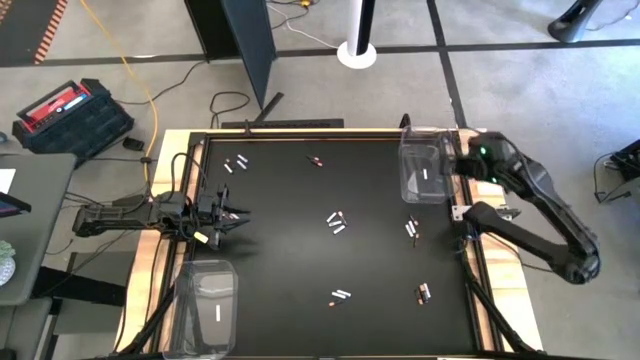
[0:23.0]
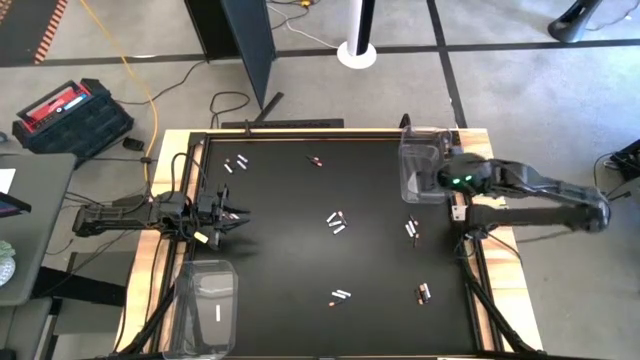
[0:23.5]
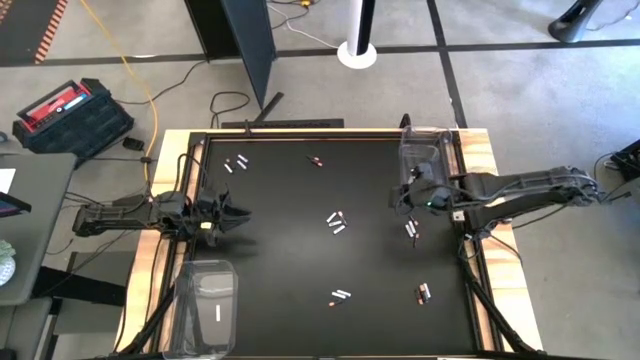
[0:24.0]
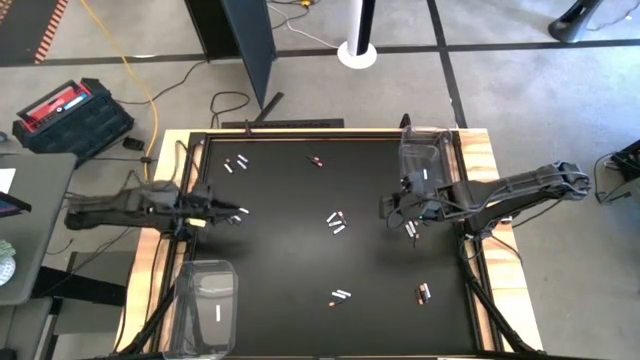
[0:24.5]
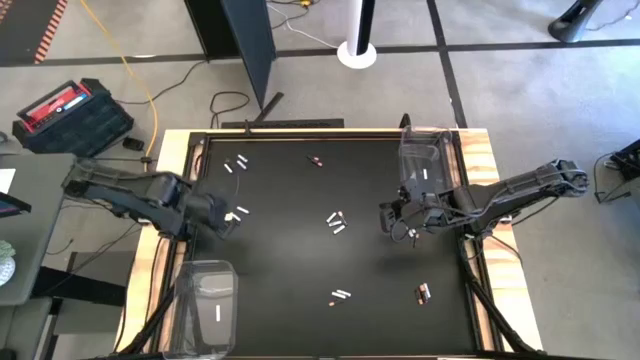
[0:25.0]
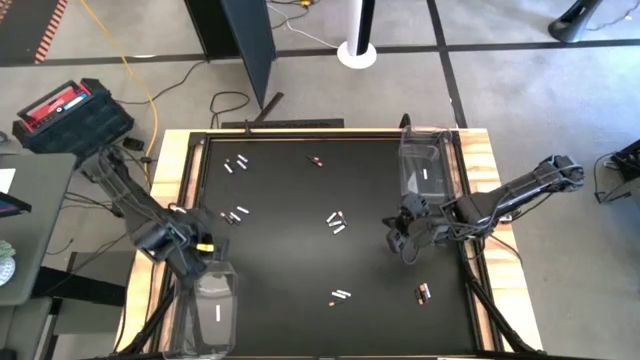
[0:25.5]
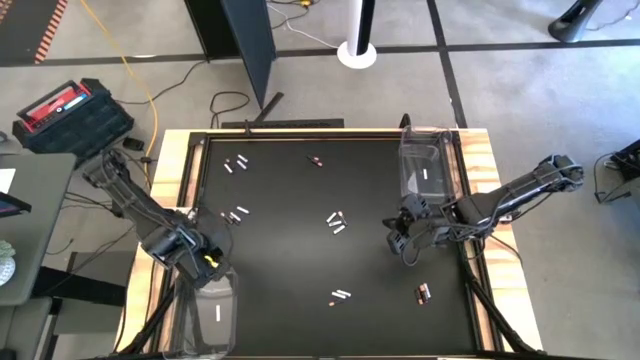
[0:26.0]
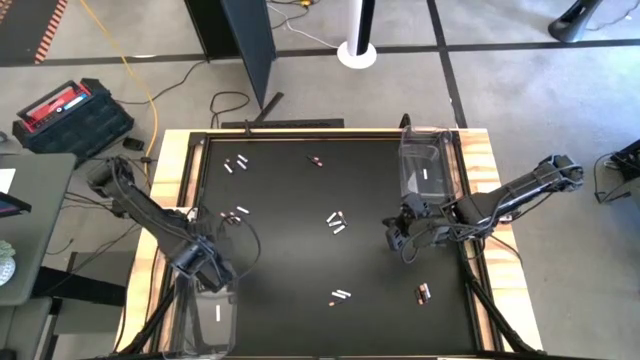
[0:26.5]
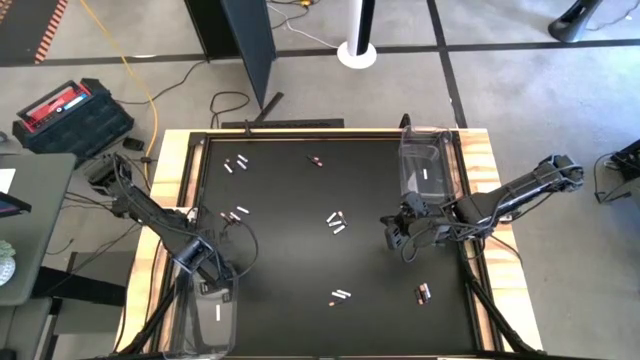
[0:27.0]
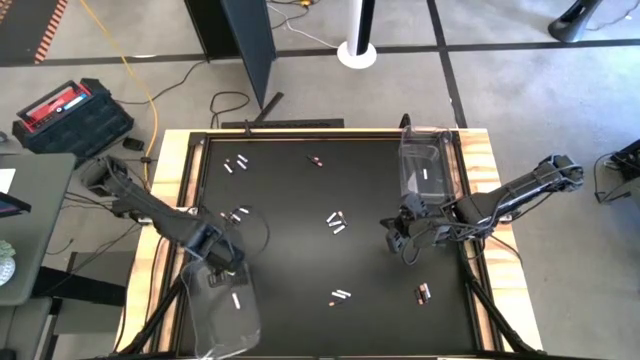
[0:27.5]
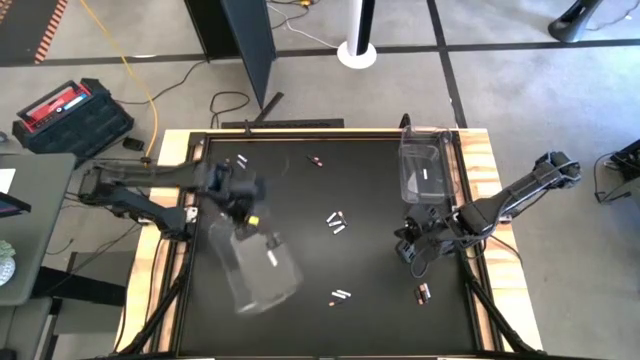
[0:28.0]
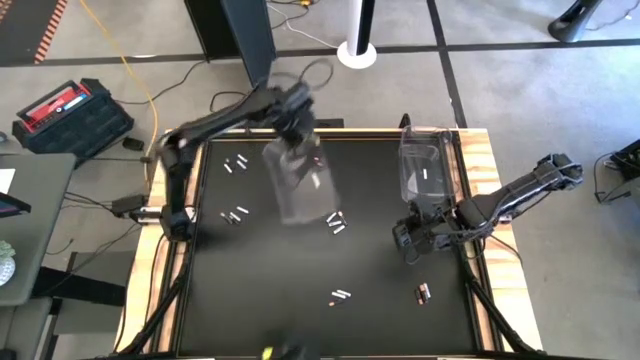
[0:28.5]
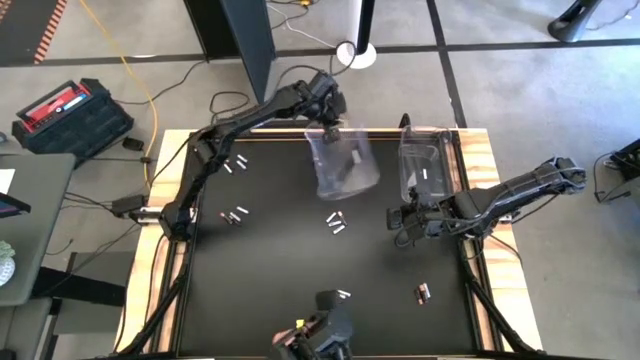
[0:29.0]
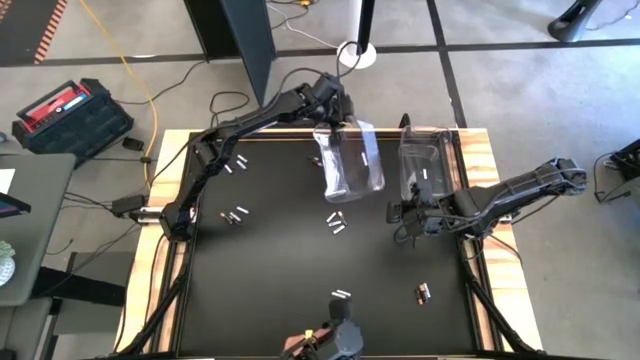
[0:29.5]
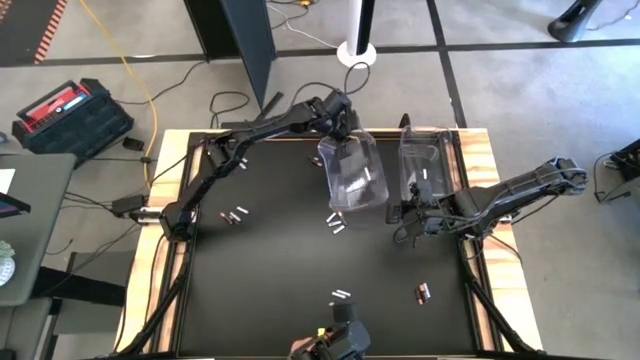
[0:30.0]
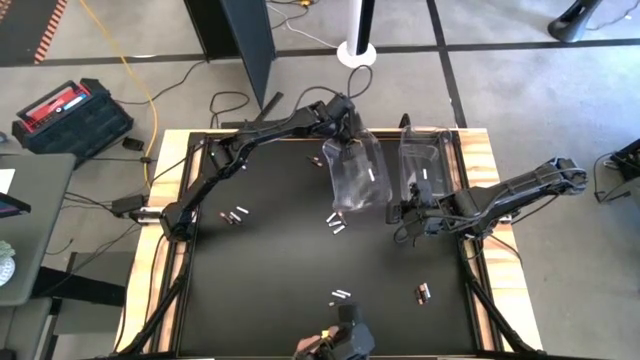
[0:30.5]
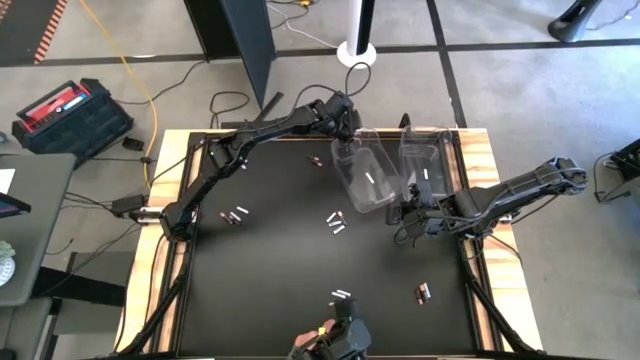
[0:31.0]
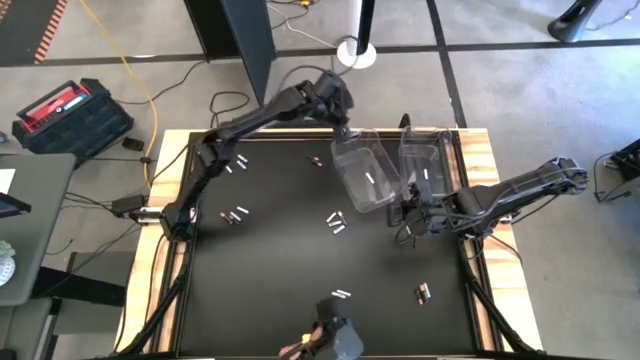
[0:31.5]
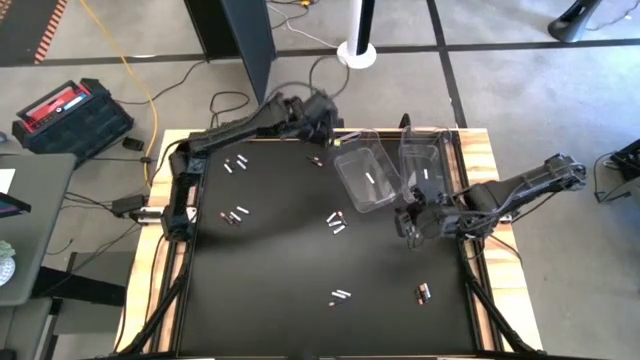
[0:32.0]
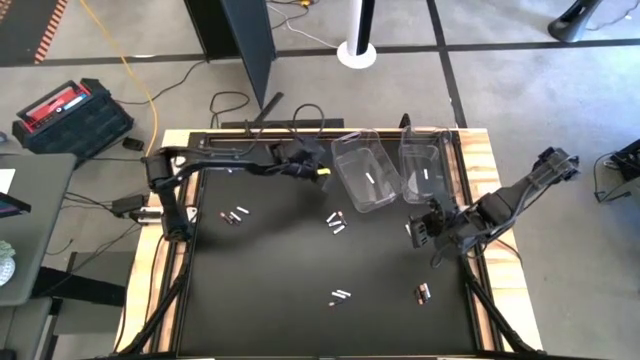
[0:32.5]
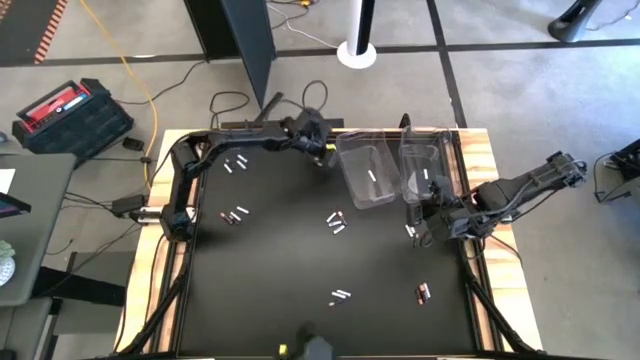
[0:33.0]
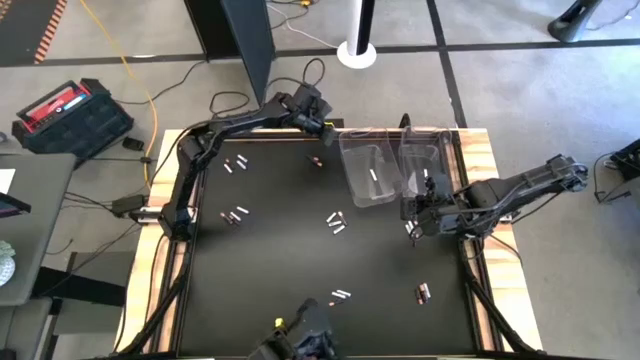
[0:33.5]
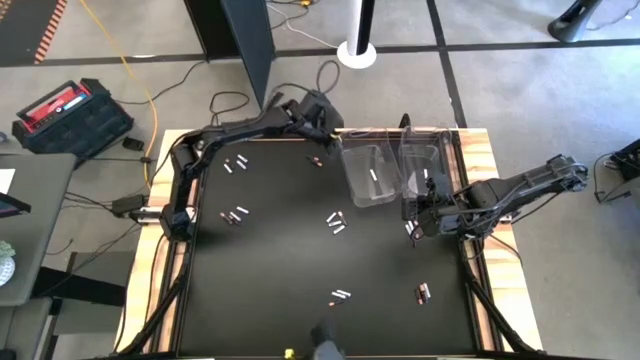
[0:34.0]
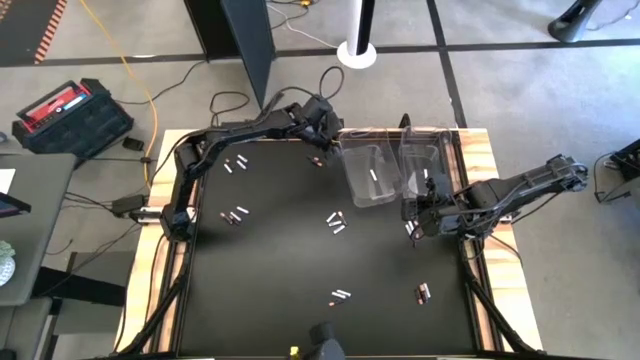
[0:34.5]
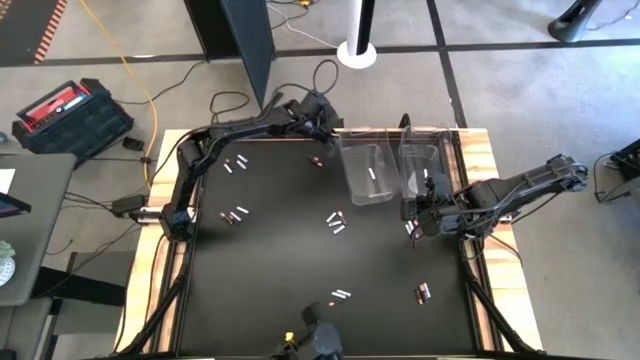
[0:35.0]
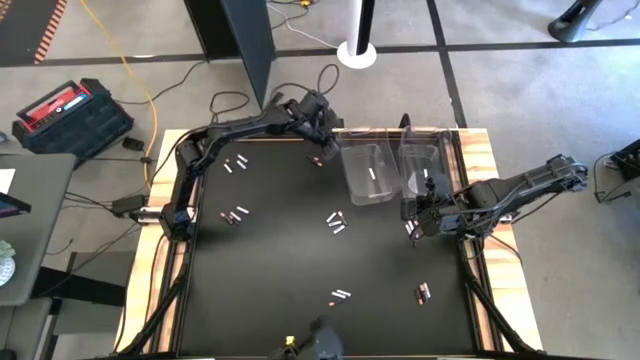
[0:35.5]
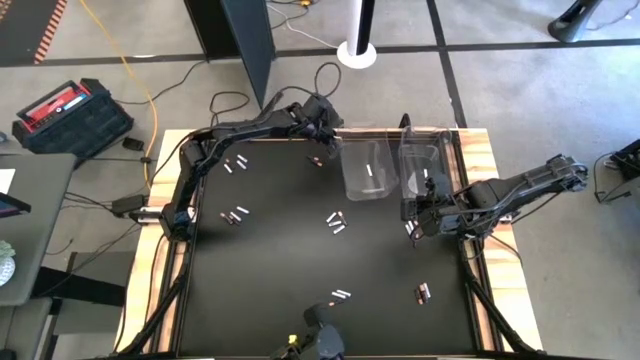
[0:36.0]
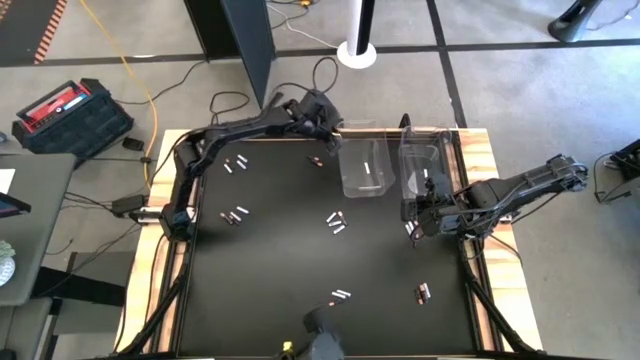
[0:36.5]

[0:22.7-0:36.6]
Task: Sort batteries
Move the left transparent bin beside the right transparent bin

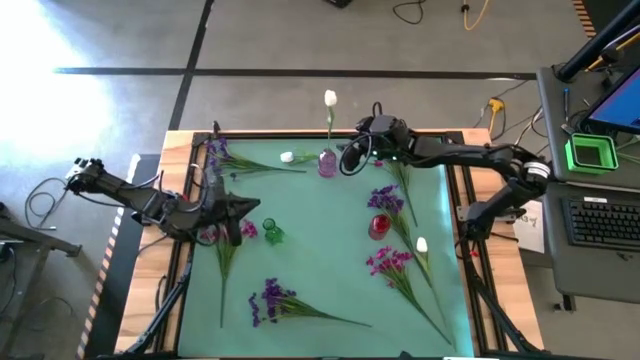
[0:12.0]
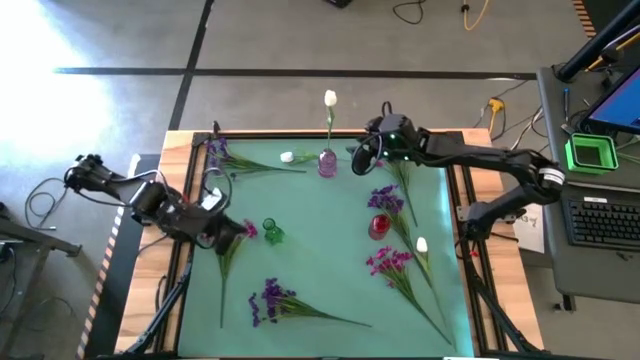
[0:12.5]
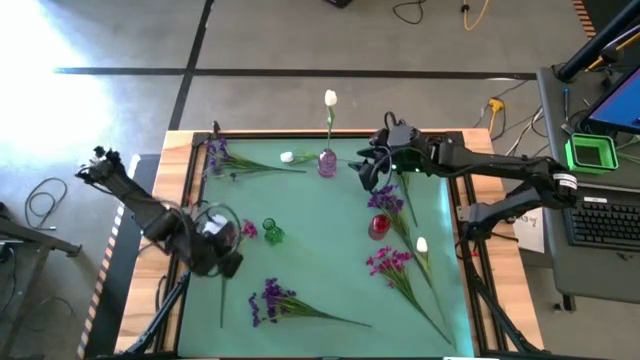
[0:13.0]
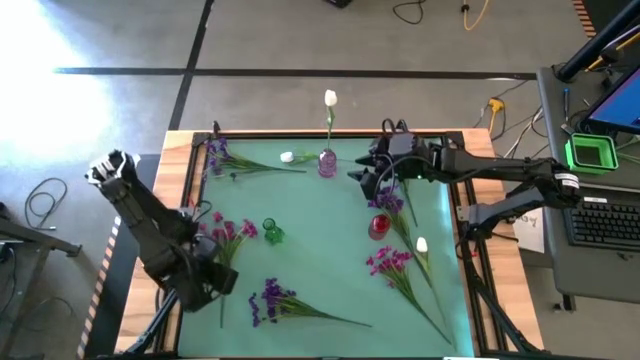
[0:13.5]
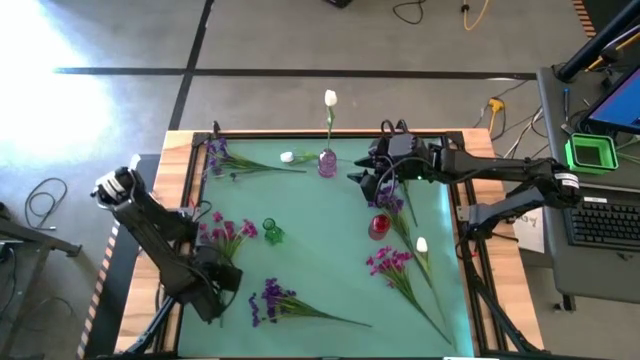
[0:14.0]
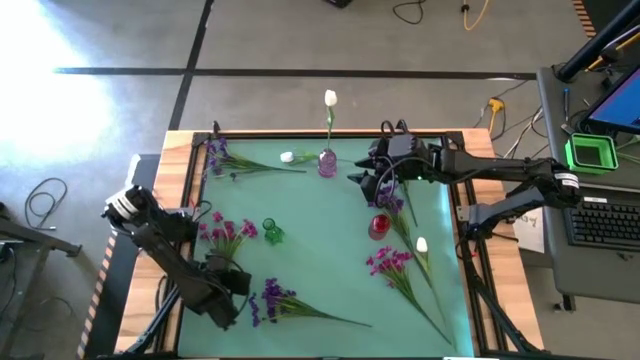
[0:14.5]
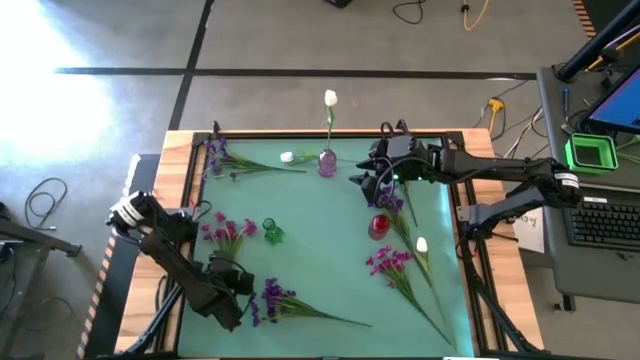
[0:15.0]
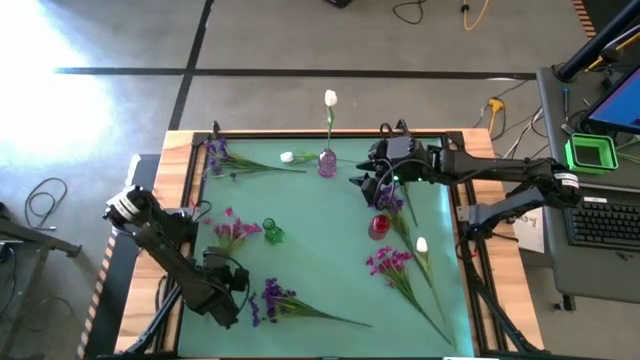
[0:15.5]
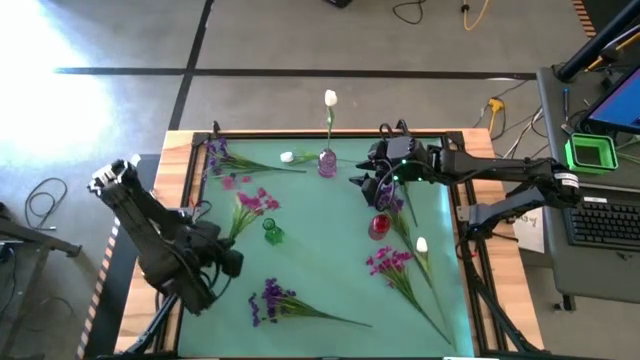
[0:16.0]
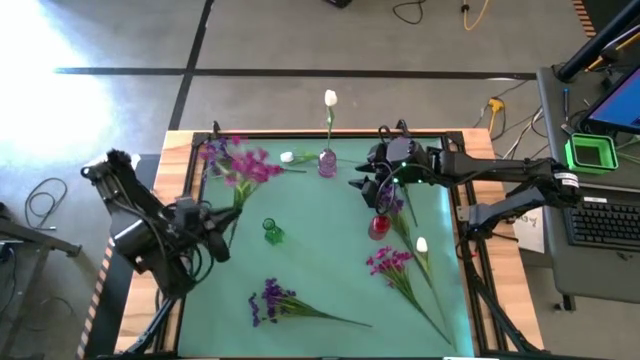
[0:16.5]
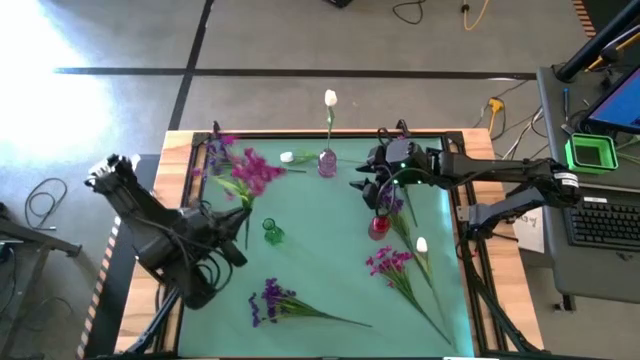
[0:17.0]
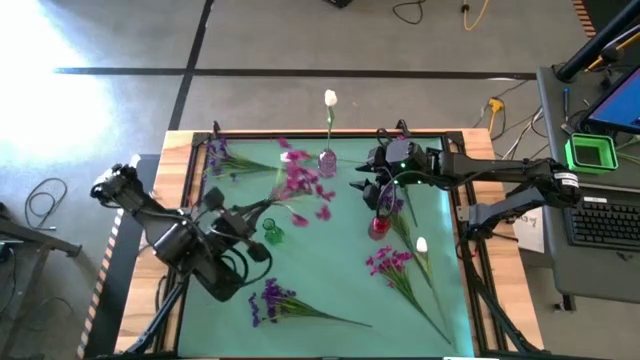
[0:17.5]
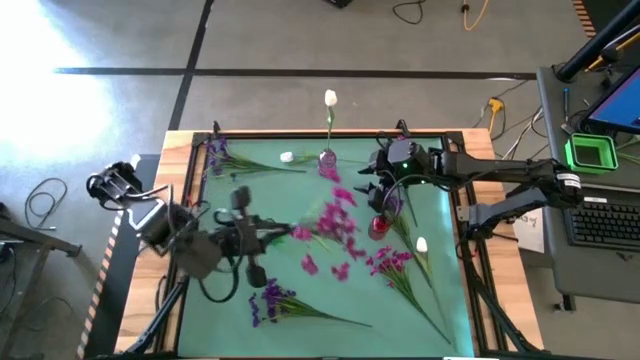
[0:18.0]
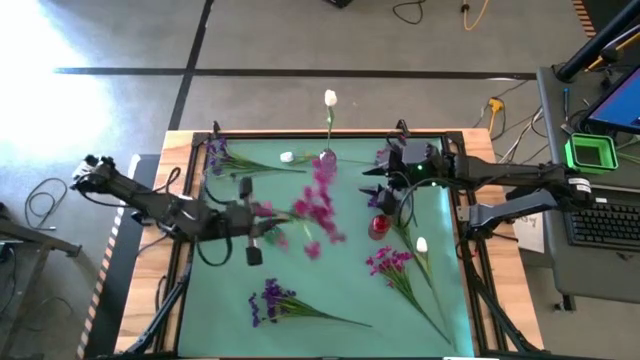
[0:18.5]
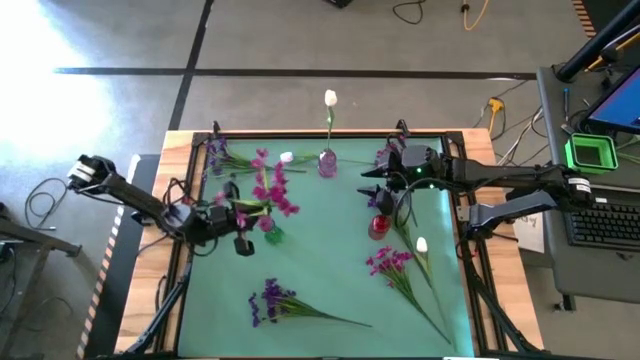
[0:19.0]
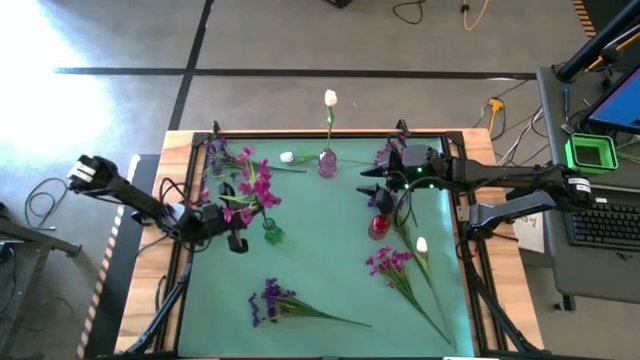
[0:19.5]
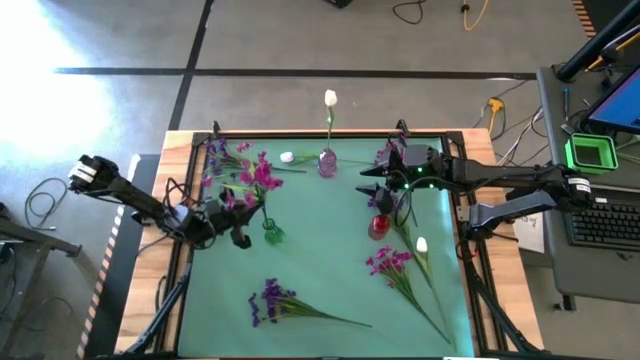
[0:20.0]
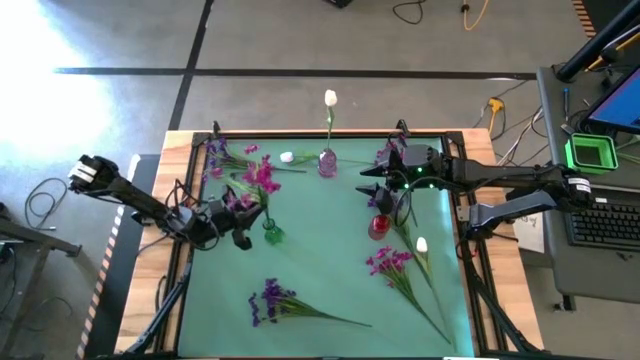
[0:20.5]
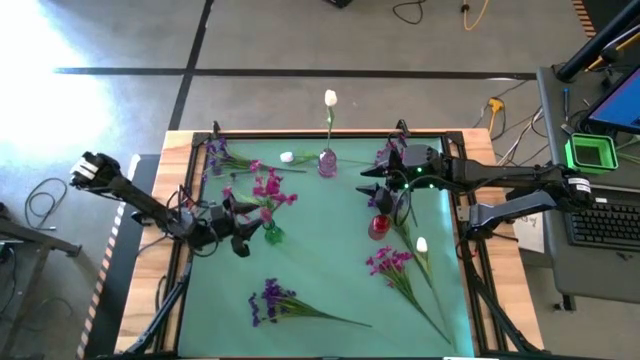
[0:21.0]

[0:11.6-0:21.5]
Task: Sort flowers into vase by color
Put the middle pink flowers into the green flower vase
